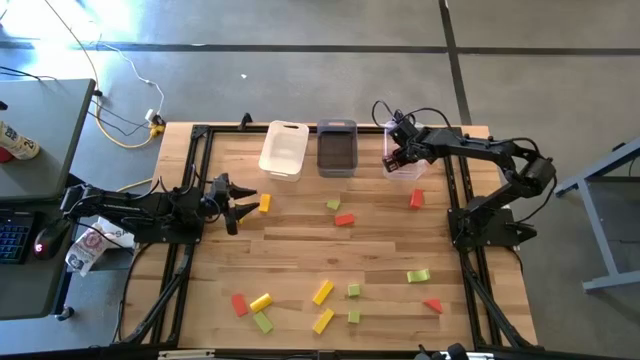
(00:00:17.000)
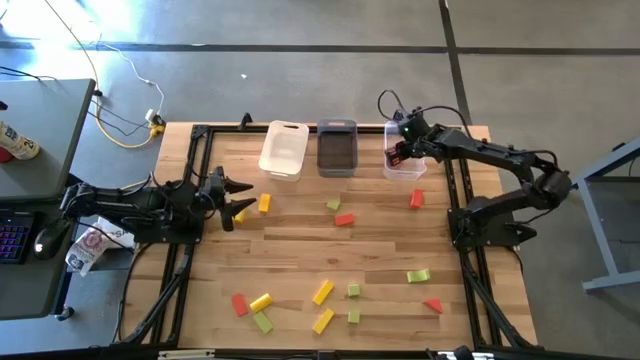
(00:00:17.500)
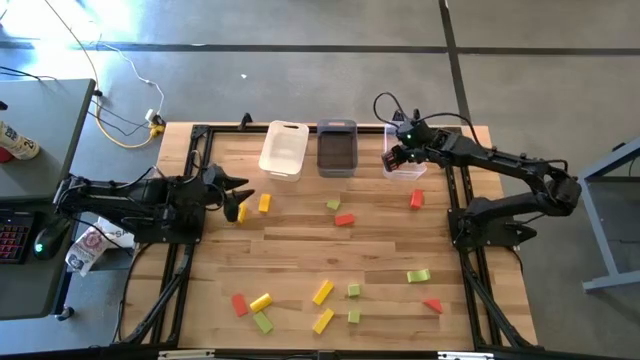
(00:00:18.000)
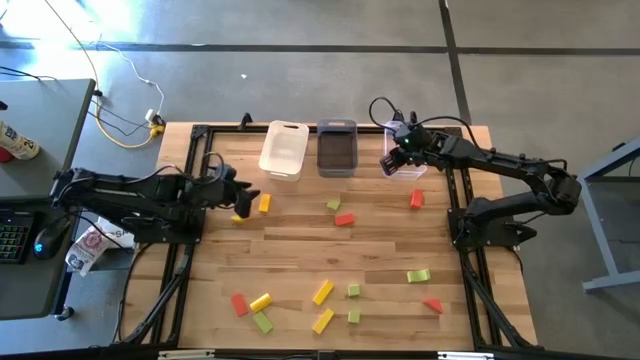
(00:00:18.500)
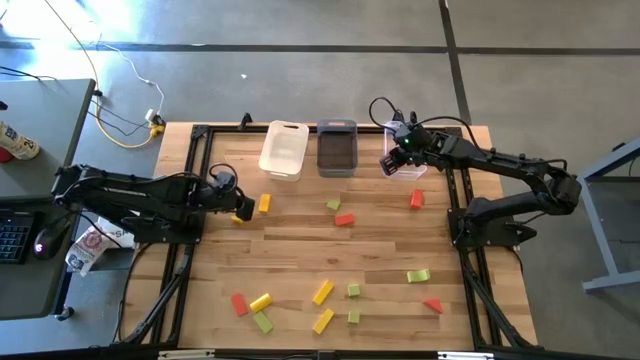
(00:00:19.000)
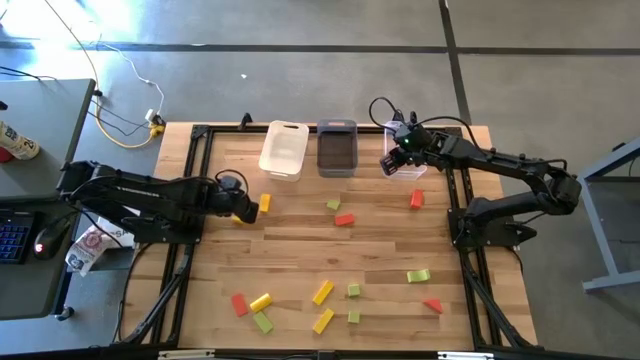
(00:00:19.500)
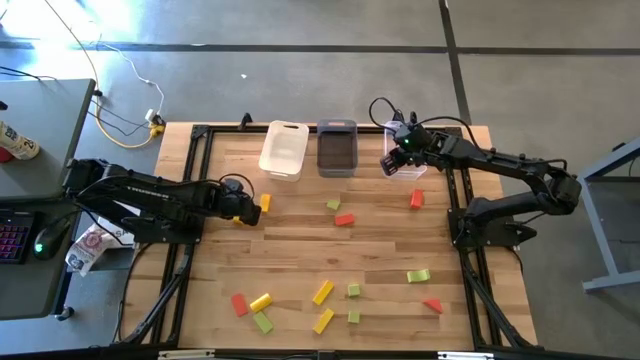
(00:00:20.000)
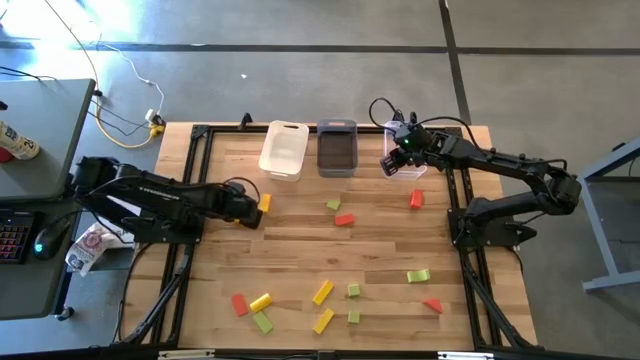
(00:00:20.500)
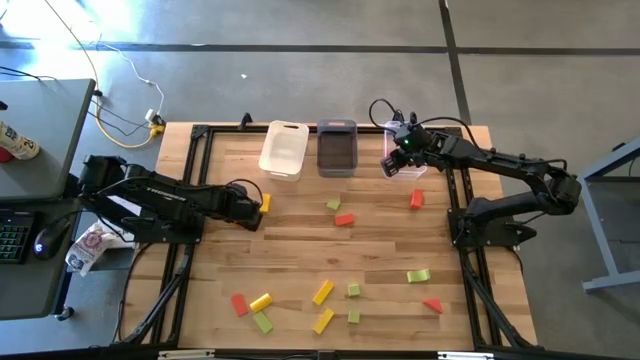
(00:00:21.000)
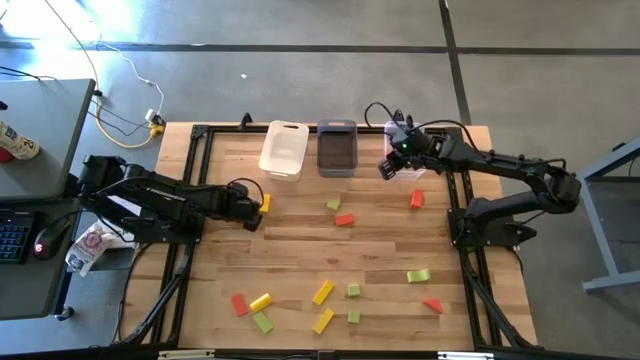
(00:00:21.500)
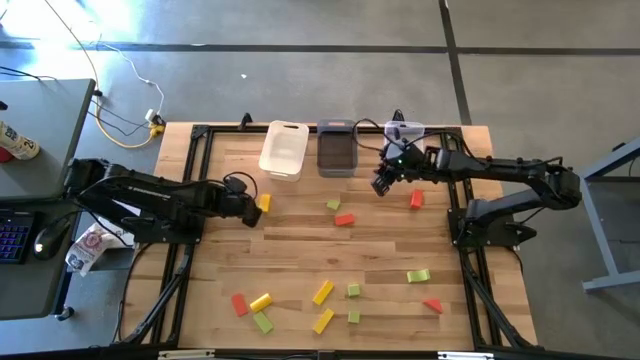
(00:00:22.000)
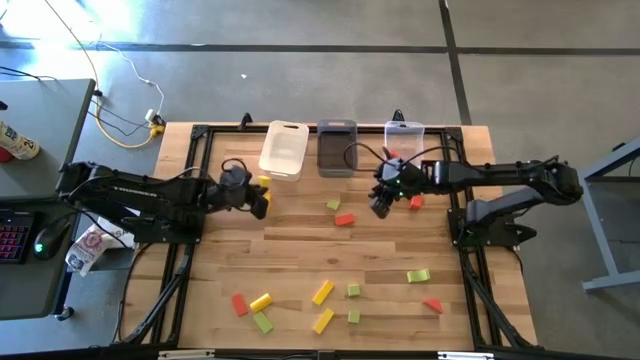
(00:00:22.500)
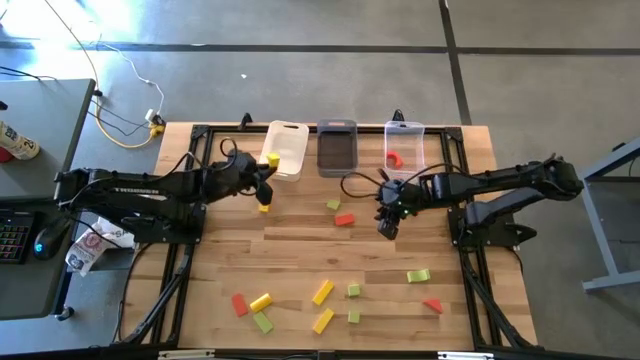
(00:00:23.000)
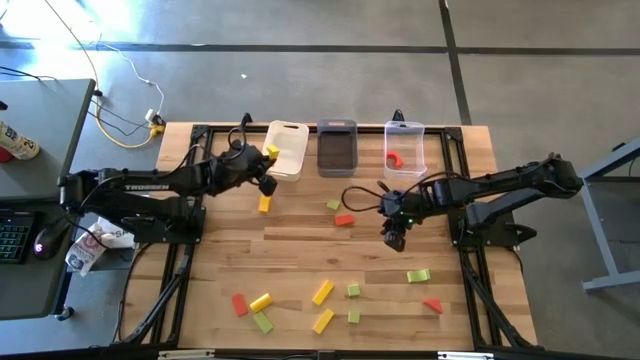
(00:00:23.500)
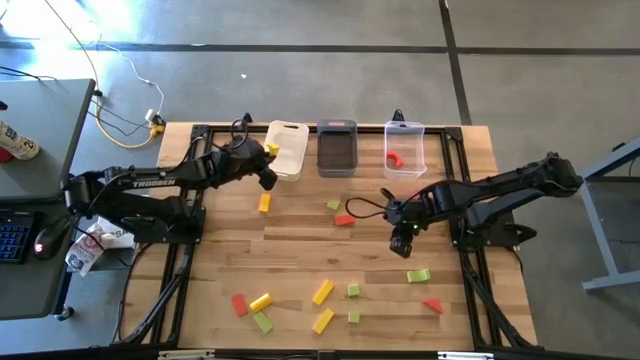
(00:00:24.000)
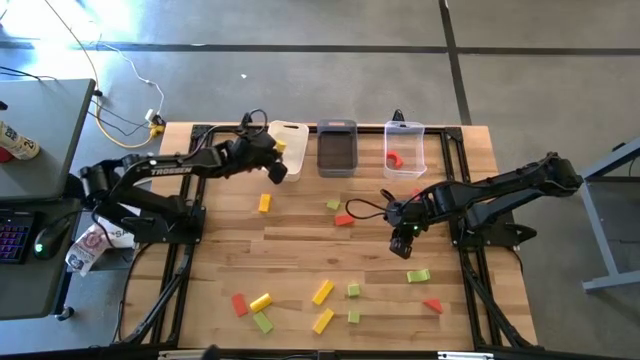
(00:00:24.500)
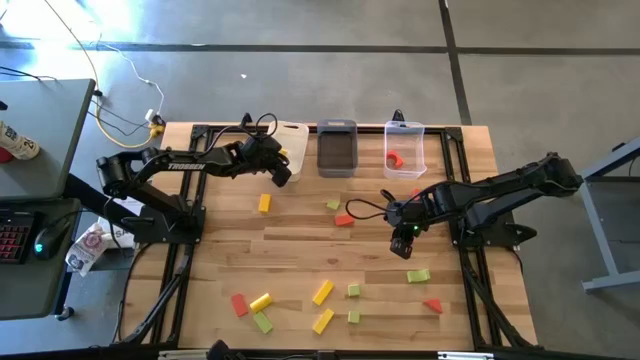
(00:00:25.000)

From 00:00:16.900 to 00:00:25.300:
Task: Sort & place blocks by color
Put the yellow block into the white bin

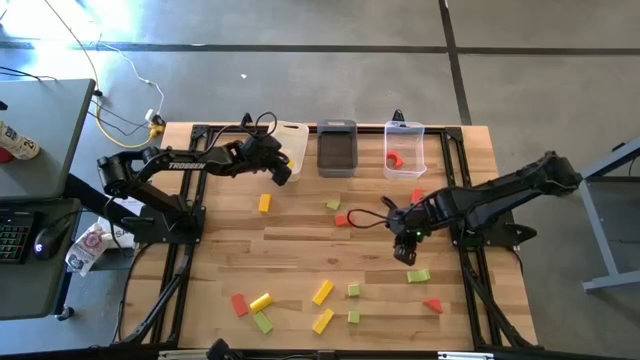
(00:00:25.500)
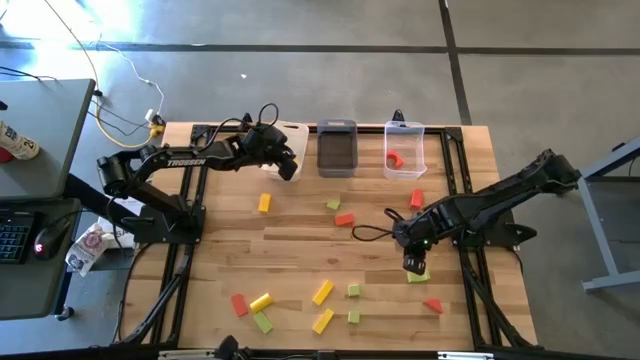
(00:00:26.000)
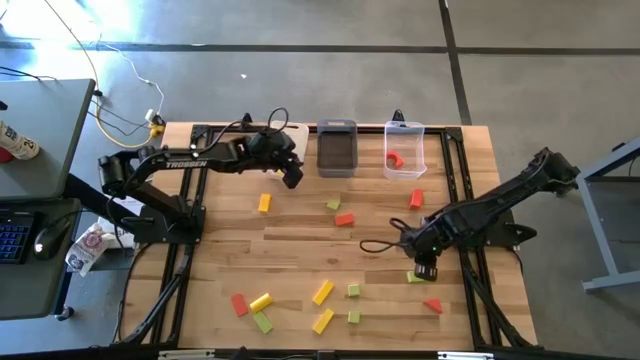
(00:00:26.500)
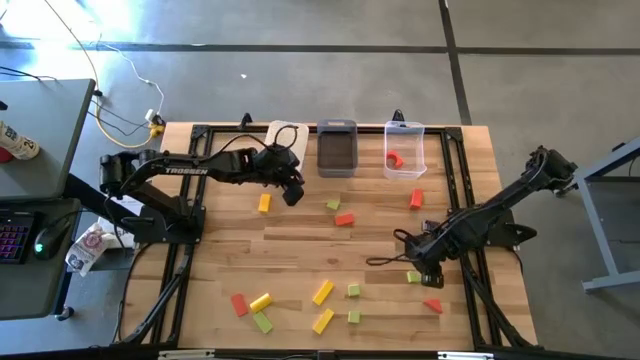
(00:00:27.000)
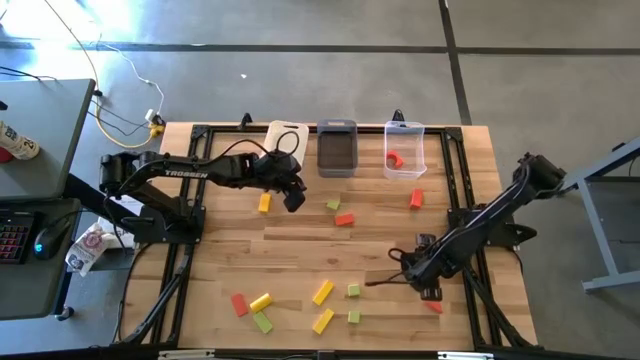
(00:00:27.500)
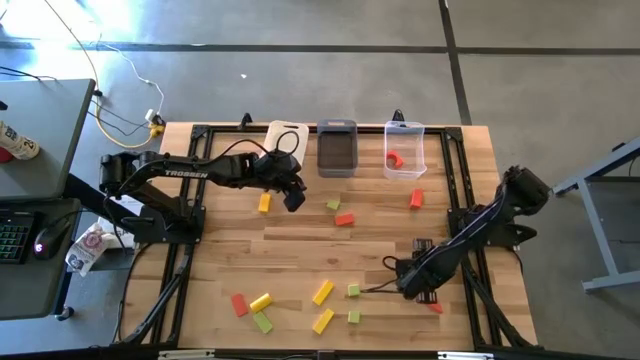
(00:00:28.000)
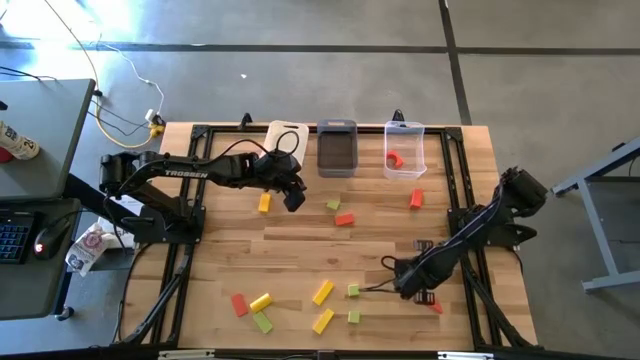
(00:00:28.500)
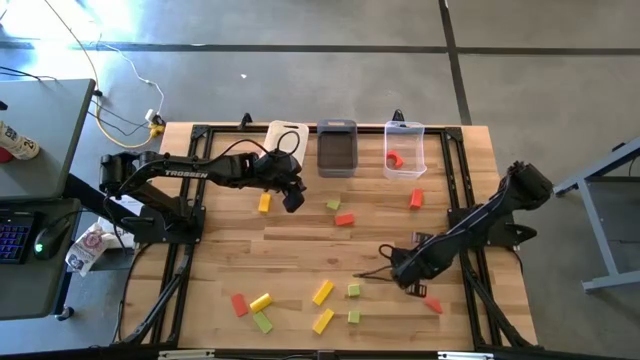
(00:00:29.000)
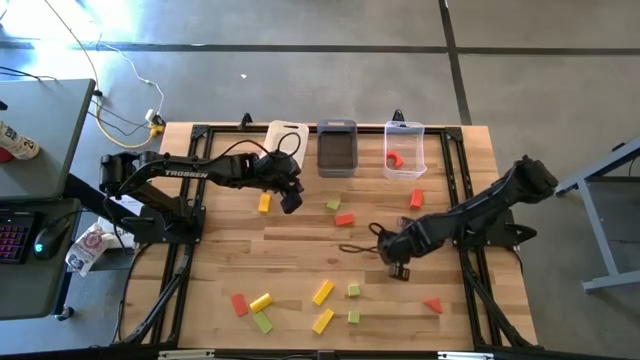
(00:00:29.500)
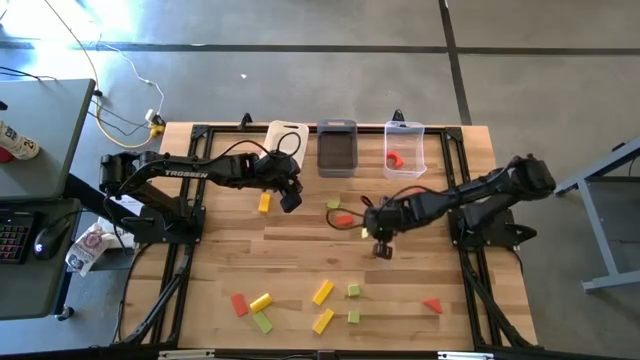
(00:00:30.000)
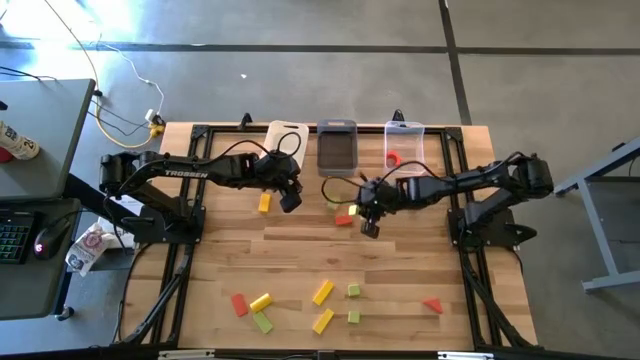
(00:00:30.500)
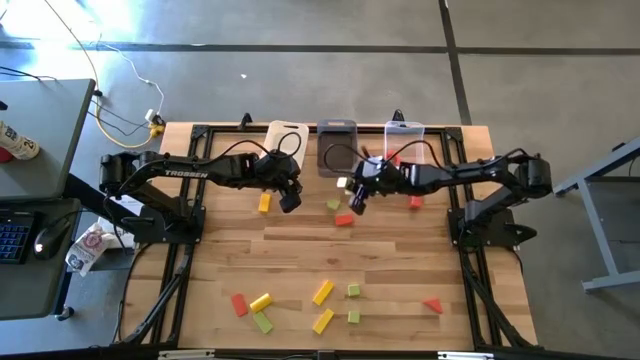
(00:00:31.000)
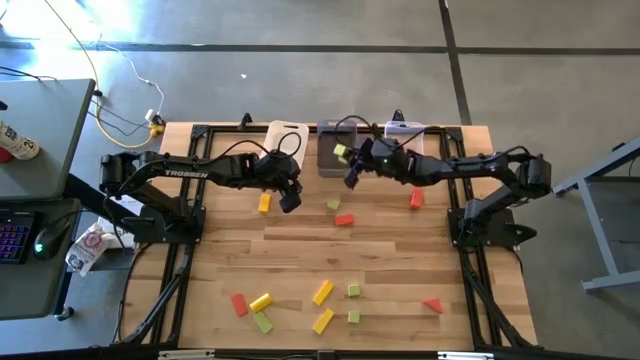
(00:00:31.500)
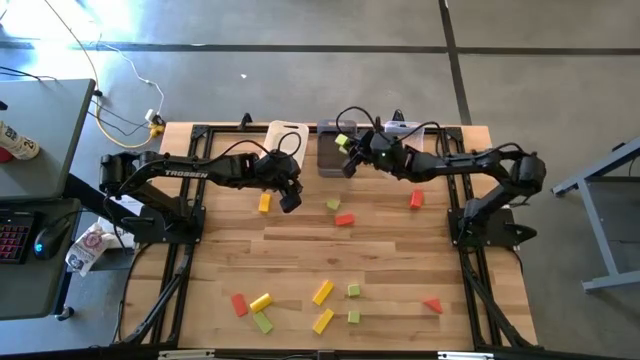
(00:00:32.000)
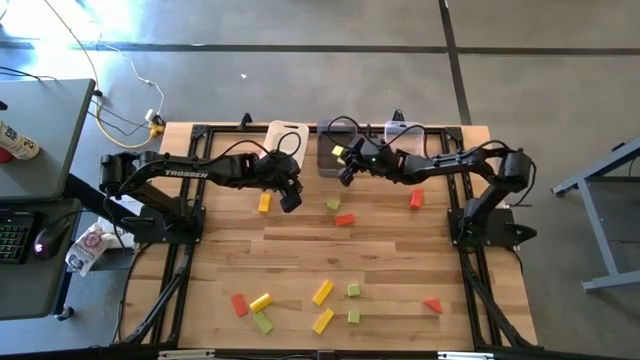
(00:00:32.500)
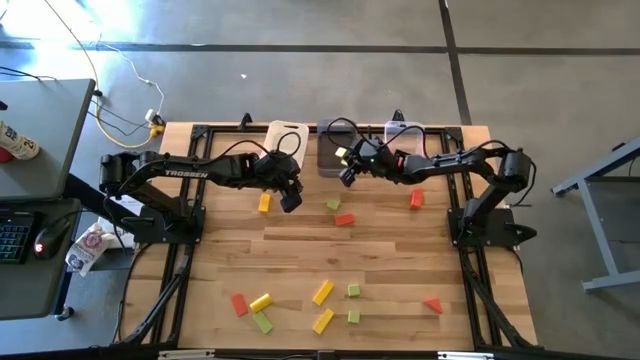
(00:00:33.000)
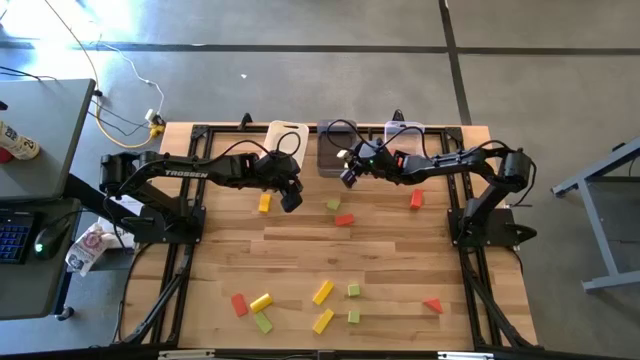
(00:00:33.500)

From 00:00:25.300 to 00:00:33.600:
Put the green block into the black bin

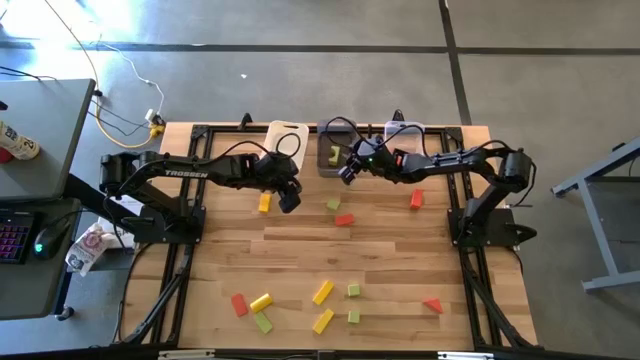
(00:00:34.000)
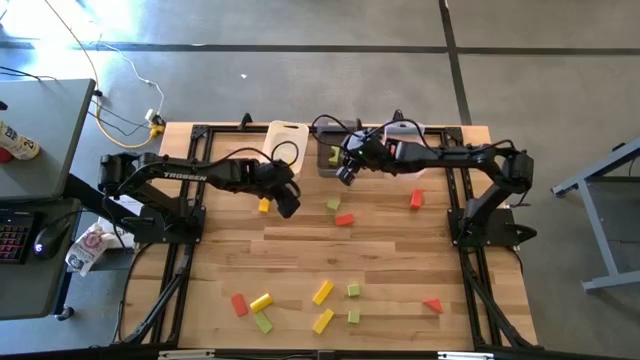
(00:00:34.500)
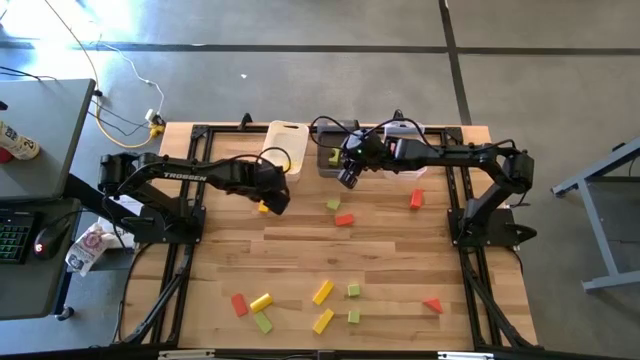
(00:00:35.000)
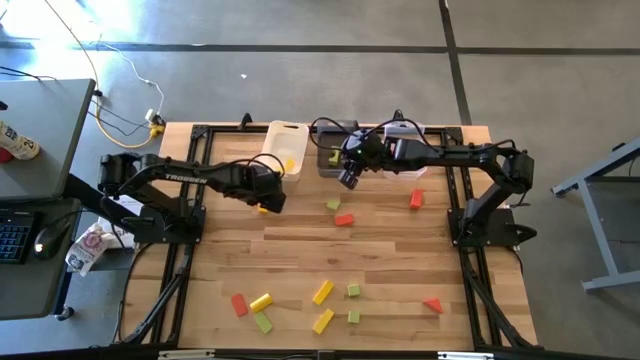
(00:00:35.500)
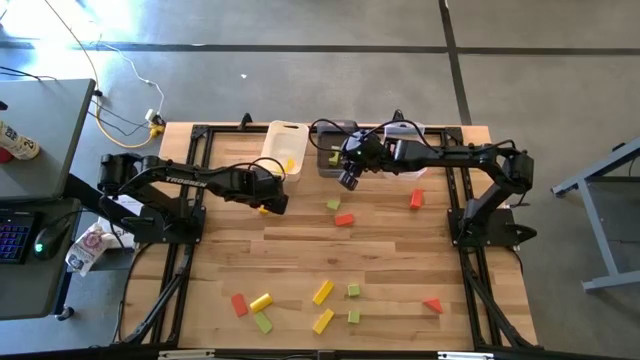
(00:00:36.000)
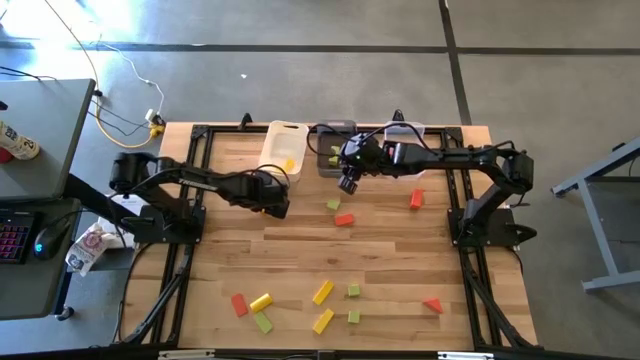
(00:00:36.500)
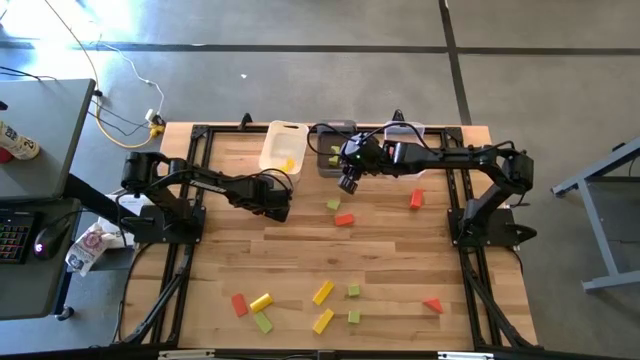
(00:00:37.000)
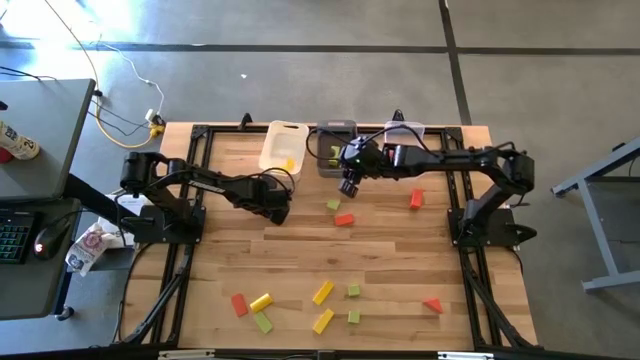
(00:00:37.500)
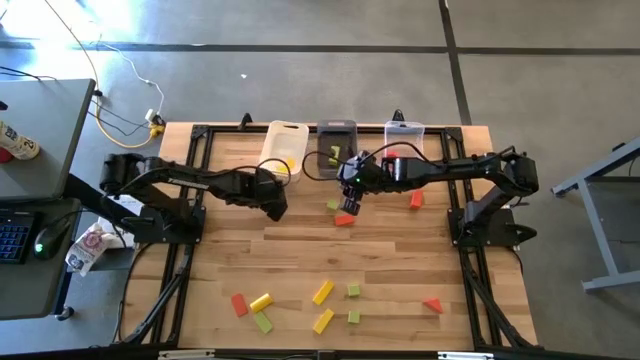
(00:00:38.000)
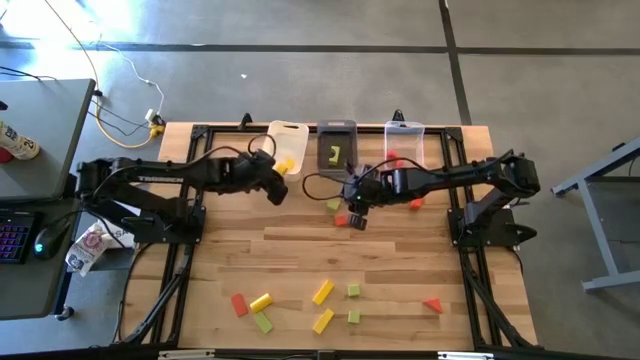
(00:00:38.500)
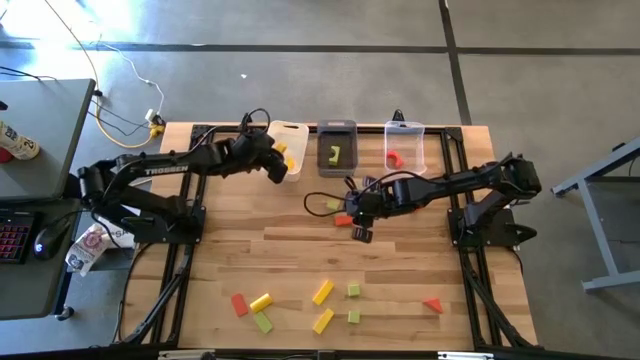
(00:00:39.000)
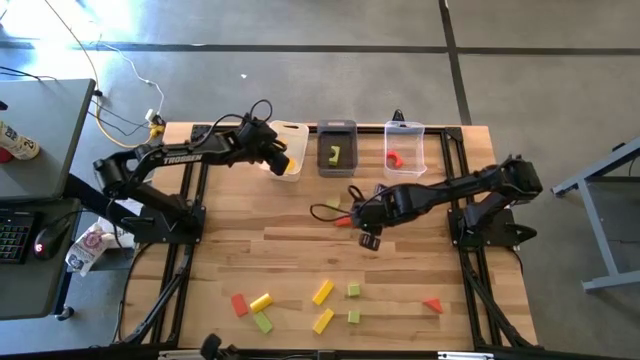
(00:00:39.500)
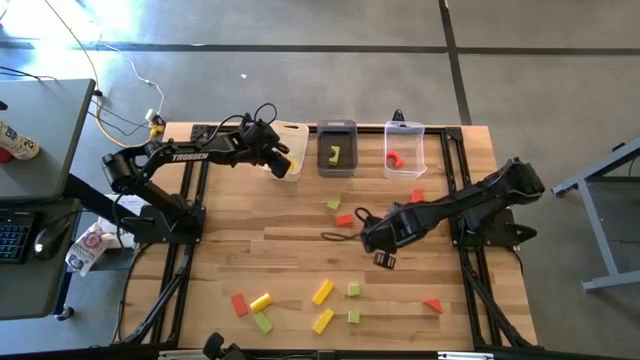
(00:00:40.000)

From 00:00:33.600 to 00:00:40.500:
Put the yellow block into the white bin
